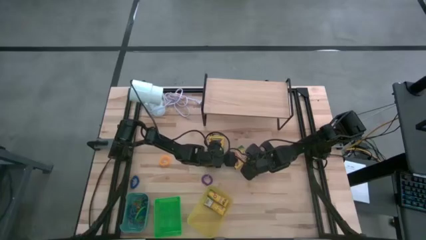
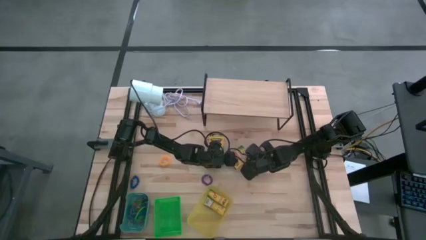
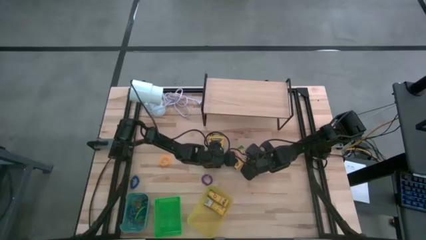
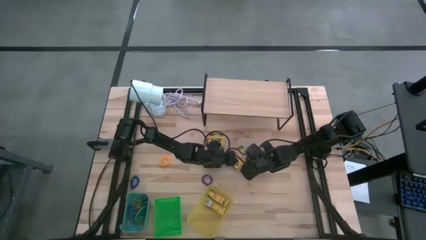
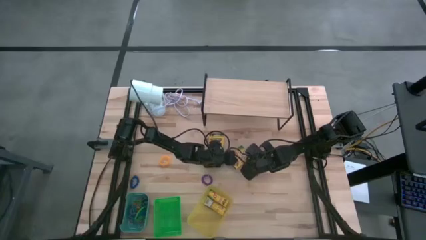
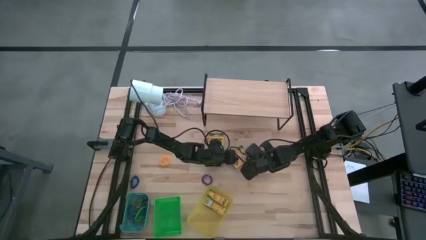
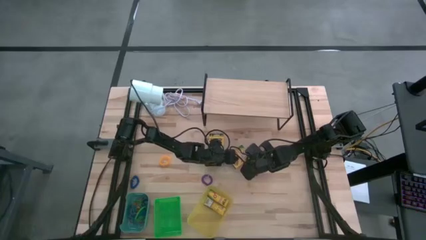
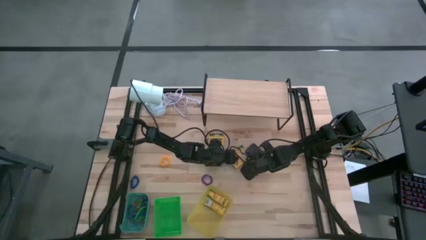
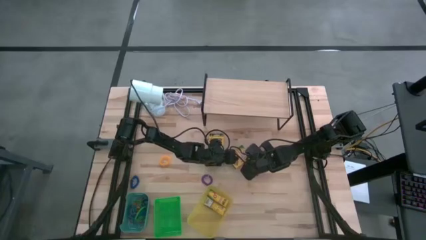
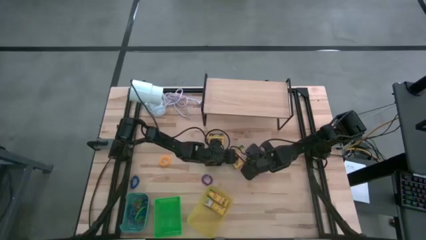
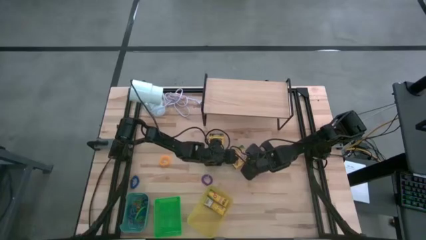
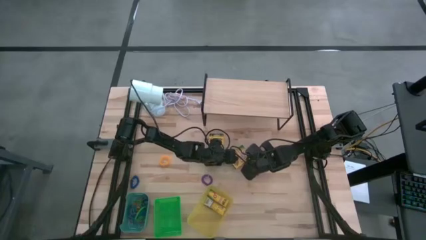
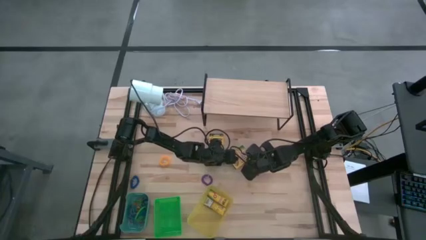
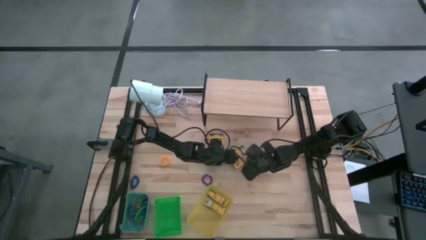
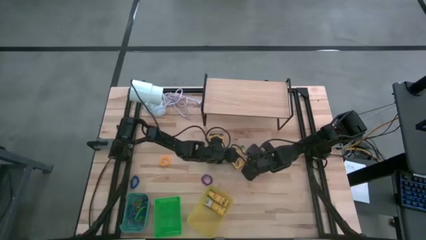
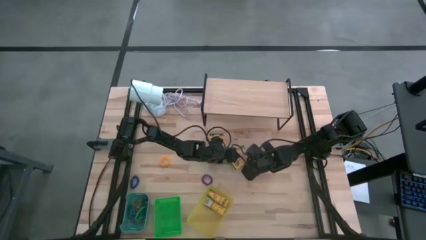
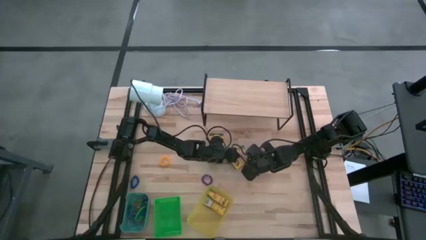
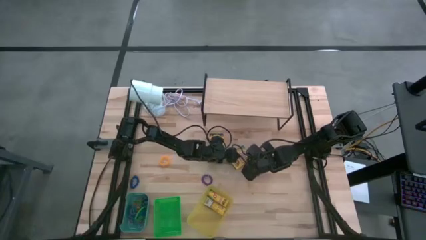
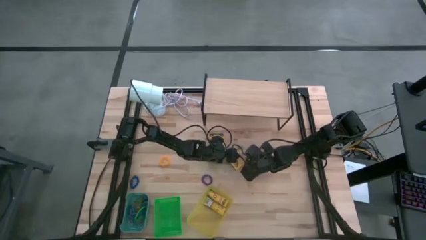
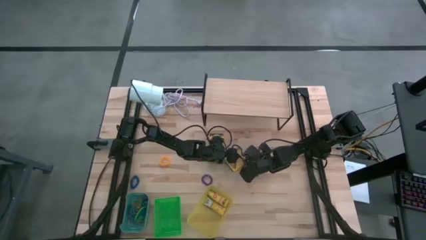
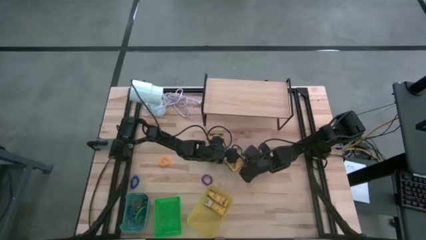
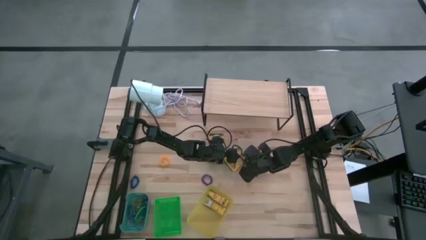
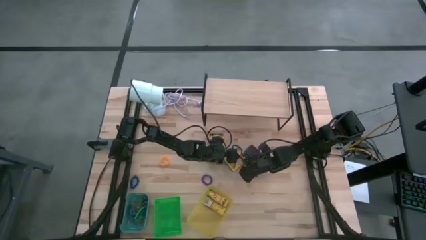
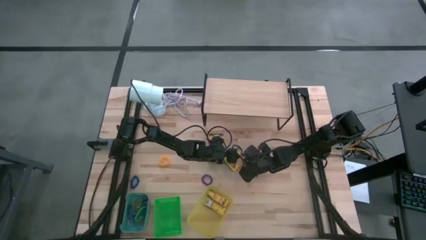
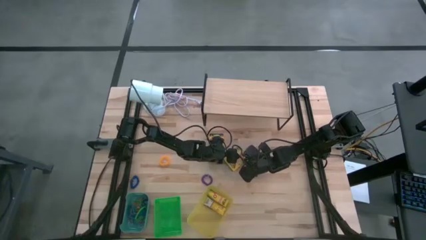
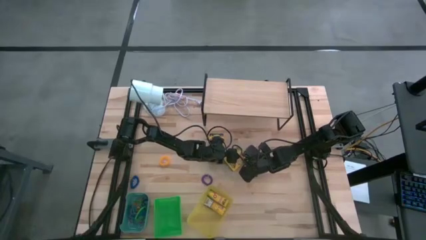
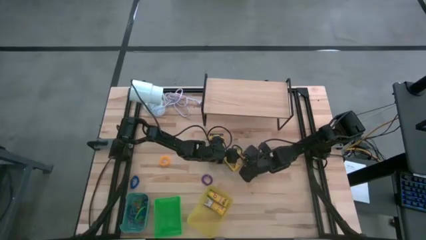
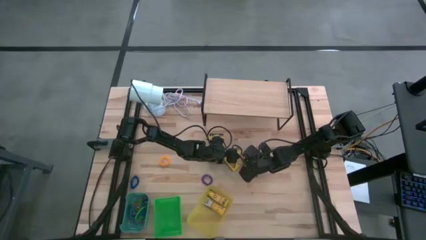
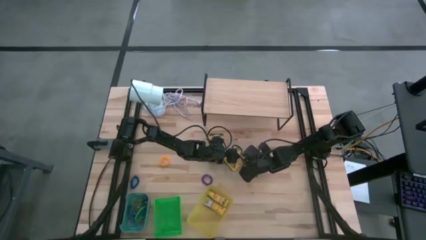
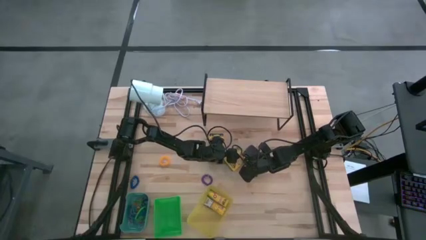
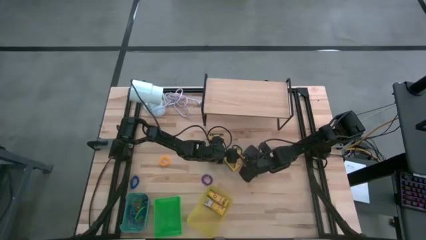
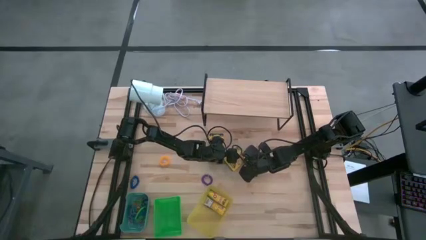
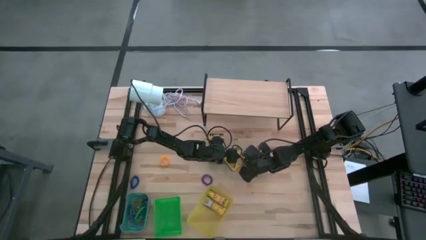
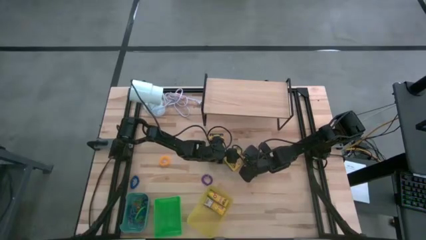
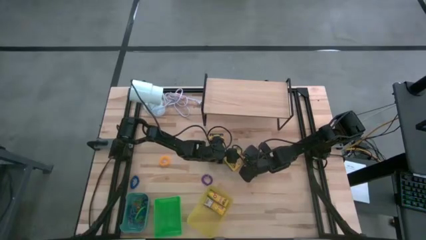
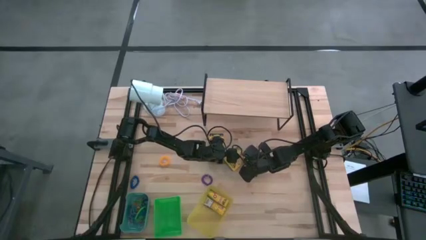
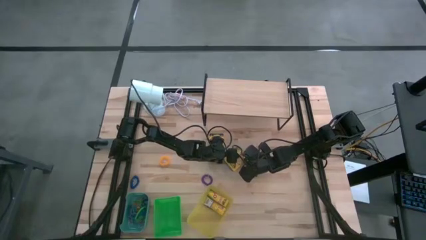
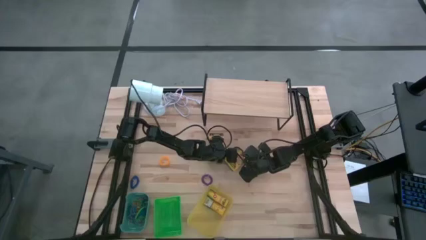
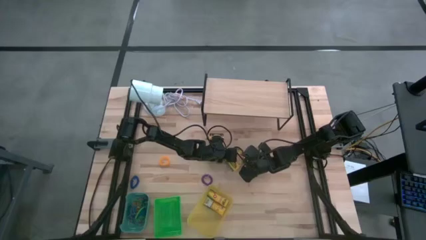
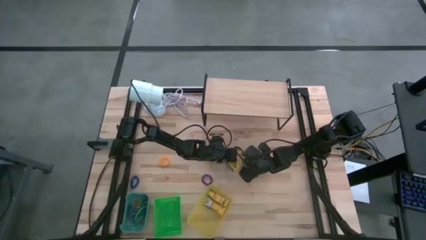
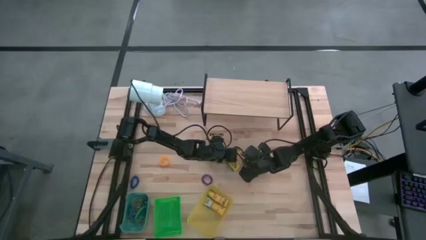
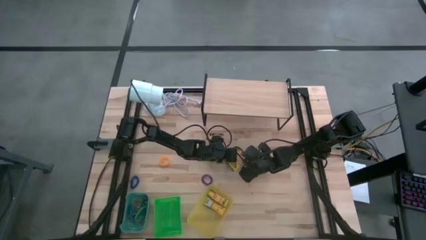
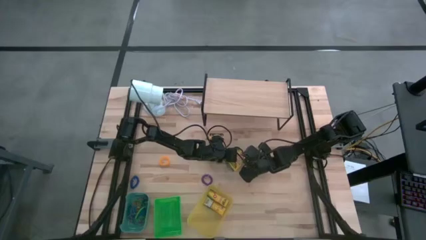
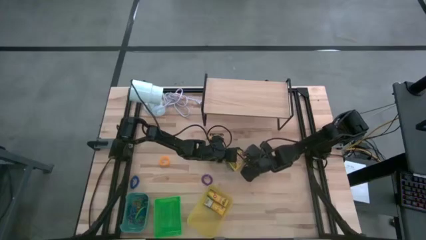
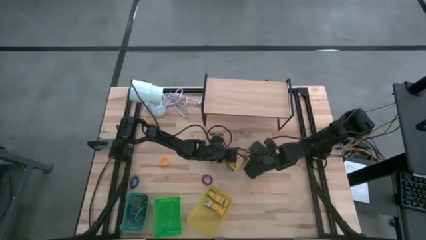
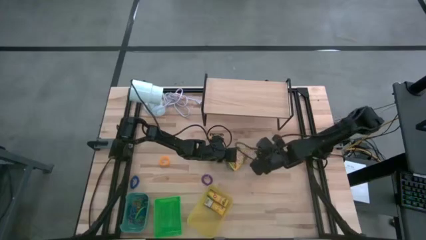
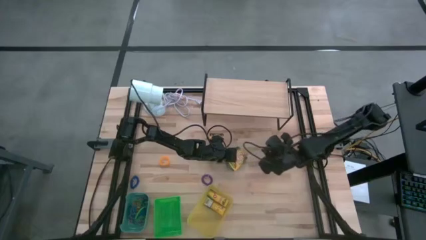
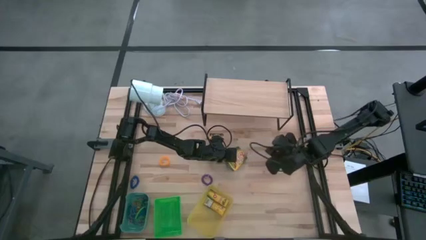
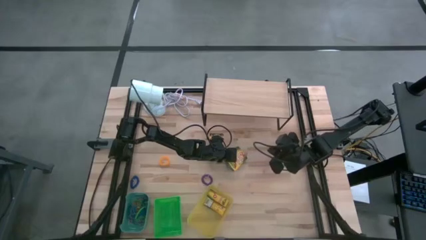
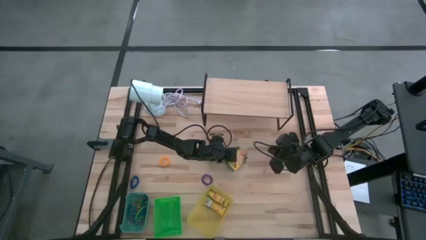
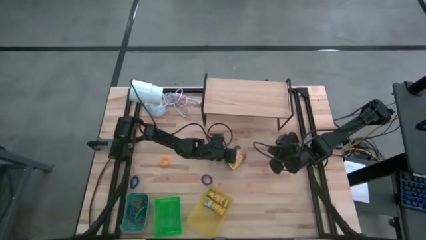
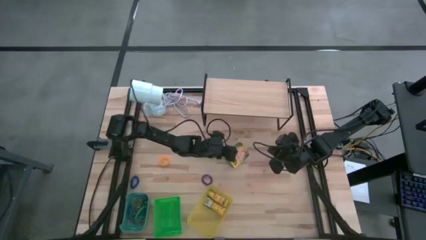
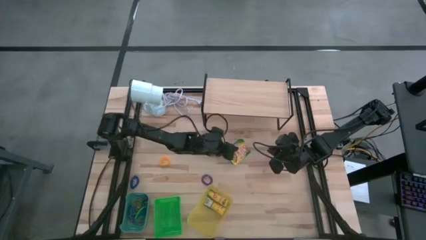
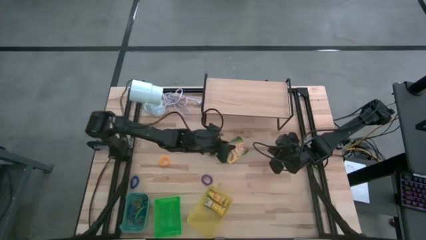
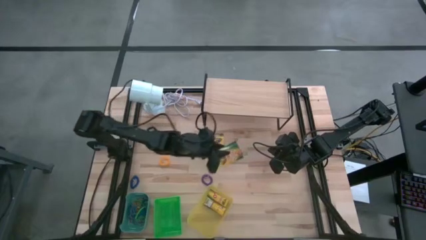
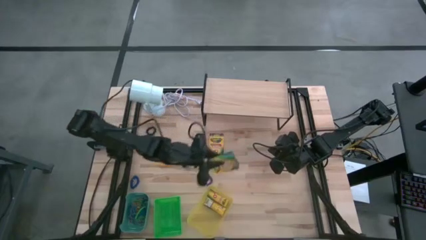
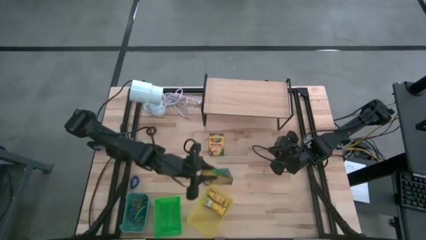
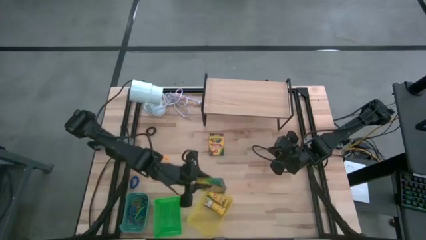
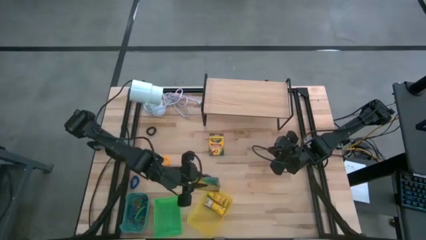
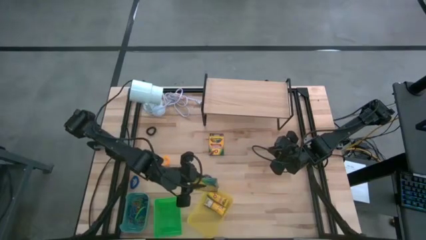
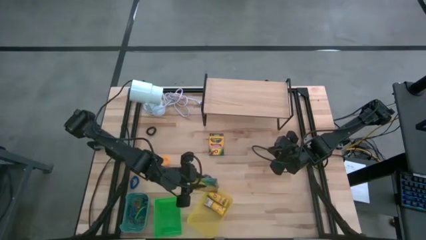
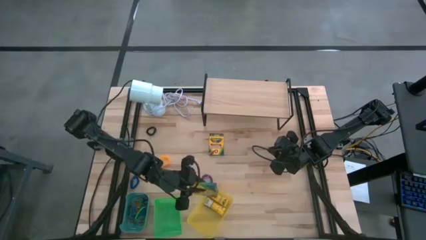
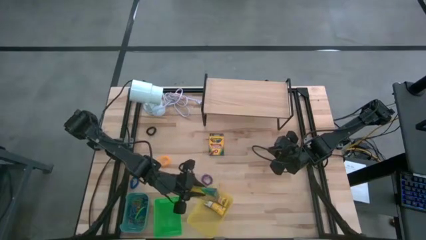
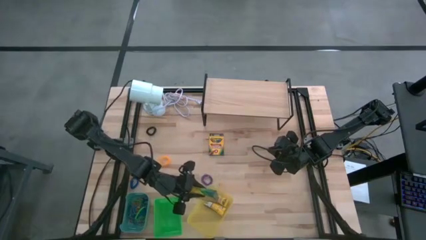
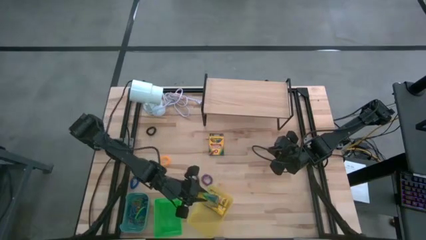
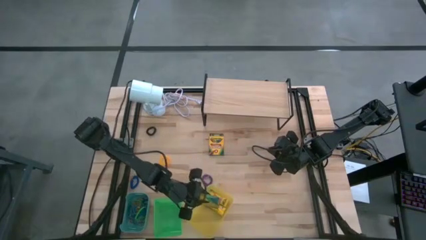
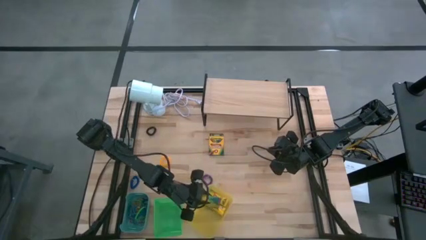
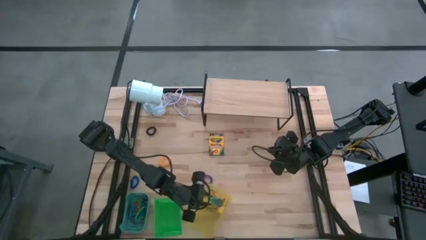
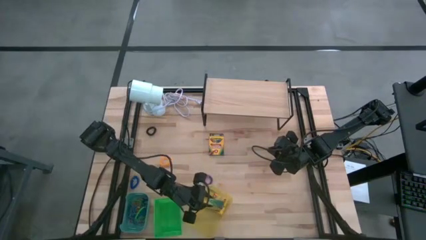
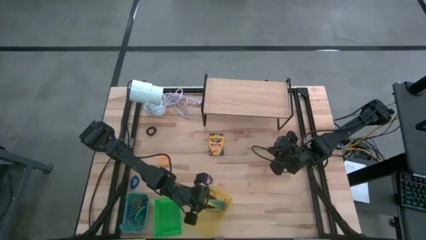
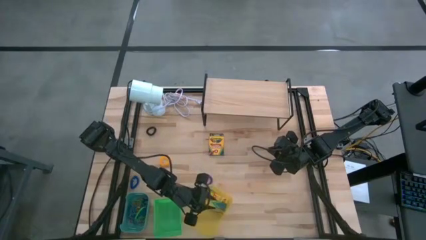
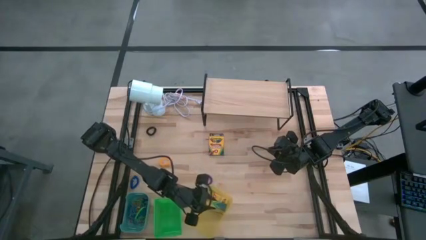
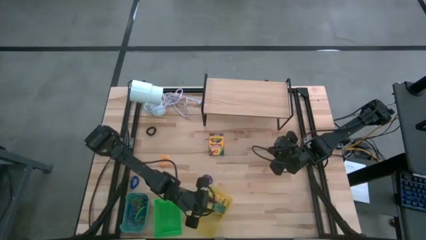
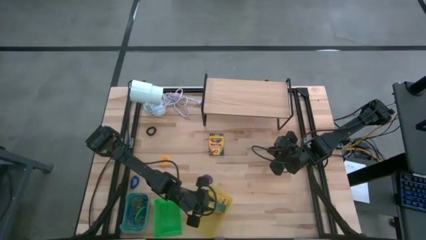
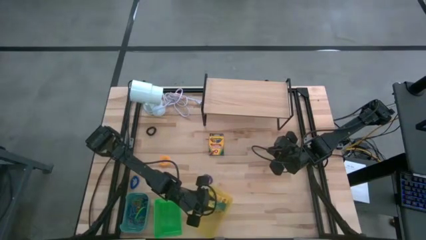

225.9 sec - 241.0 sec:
Task: Pick & Place Office Desk Supplies
Put the crayon box into the yellow bin
